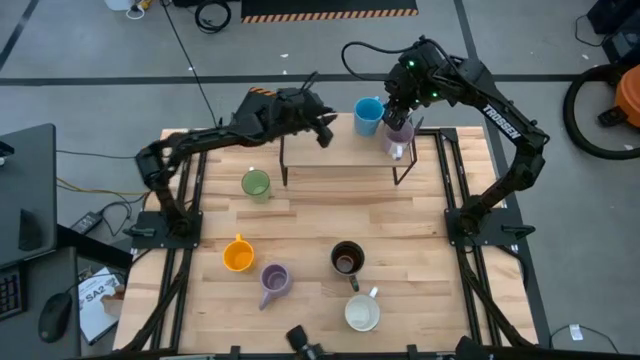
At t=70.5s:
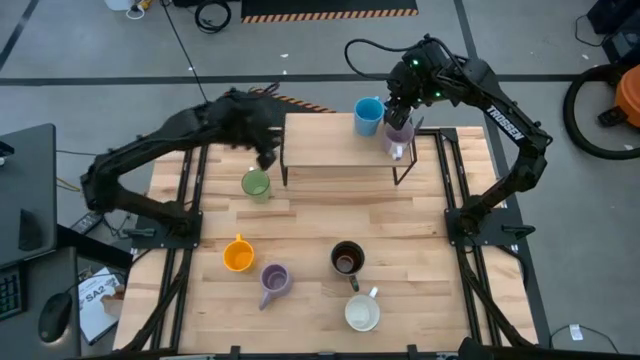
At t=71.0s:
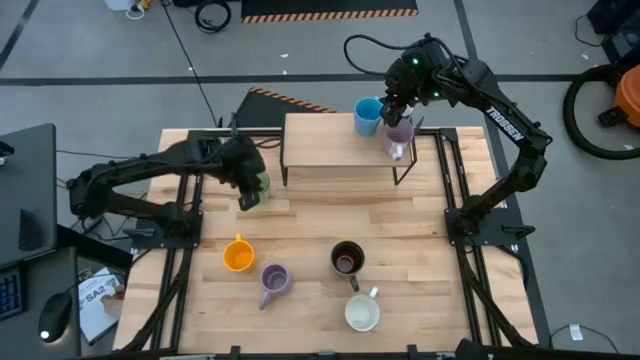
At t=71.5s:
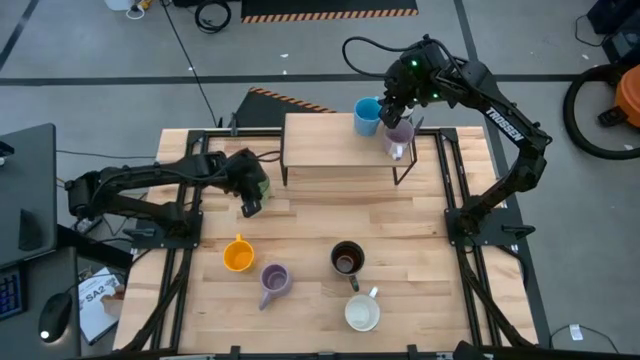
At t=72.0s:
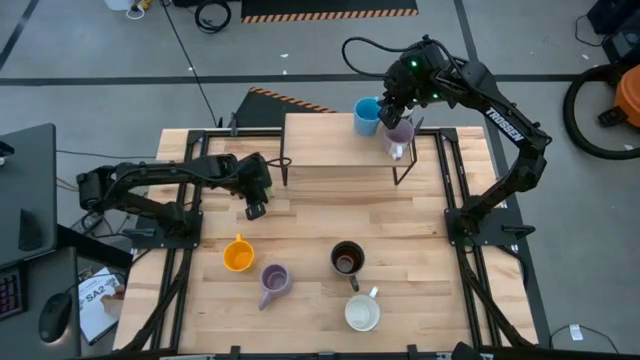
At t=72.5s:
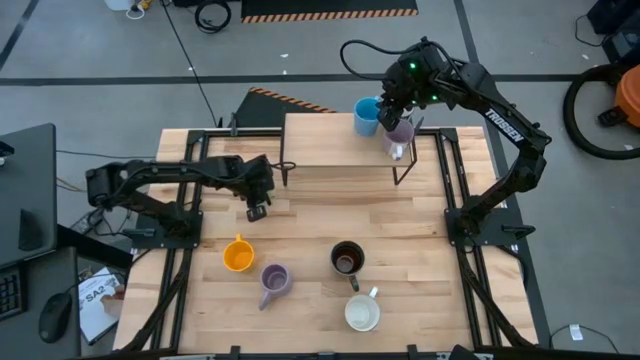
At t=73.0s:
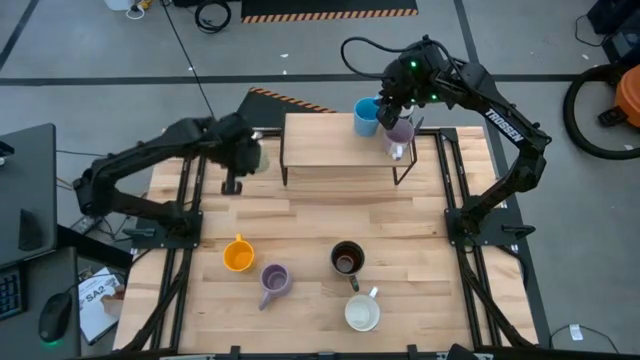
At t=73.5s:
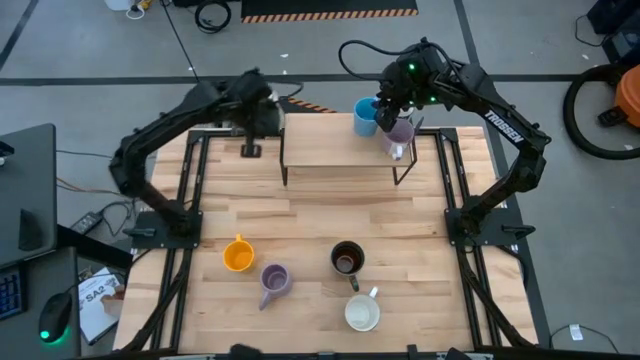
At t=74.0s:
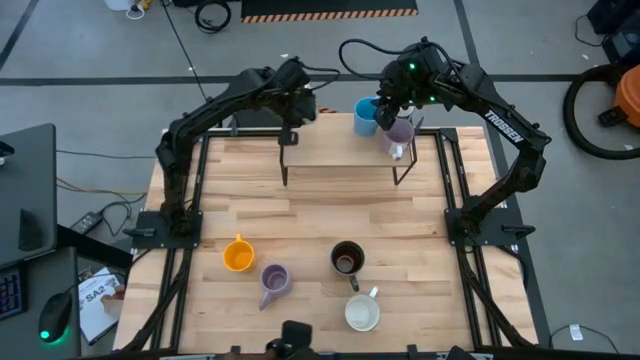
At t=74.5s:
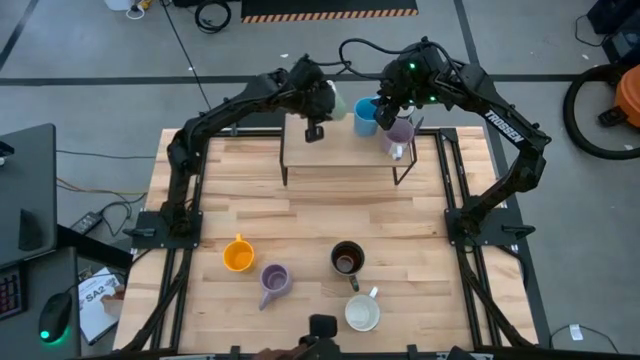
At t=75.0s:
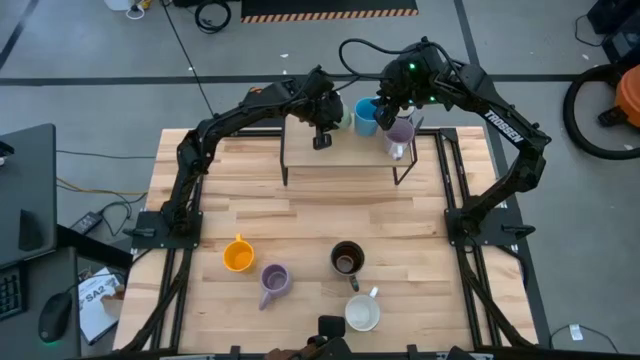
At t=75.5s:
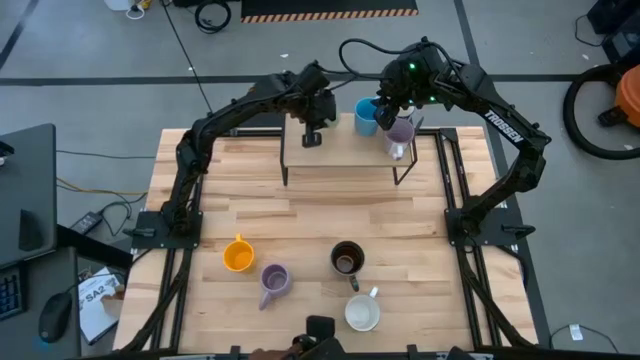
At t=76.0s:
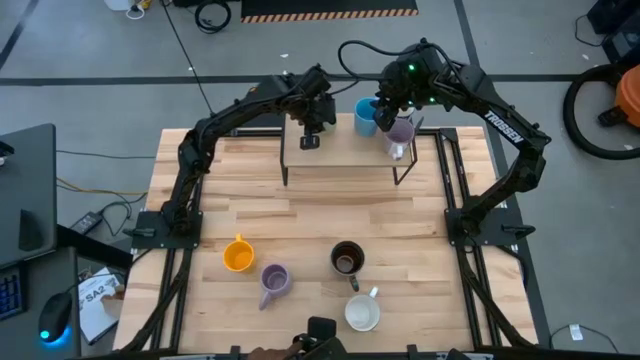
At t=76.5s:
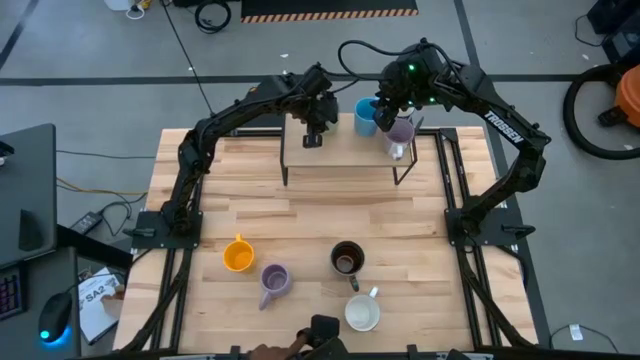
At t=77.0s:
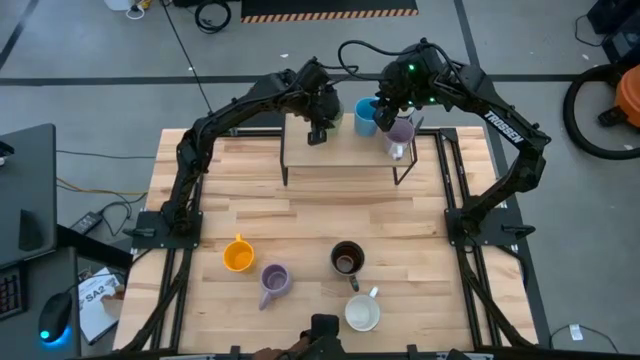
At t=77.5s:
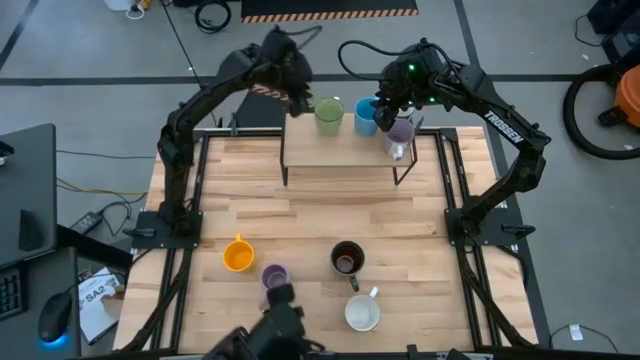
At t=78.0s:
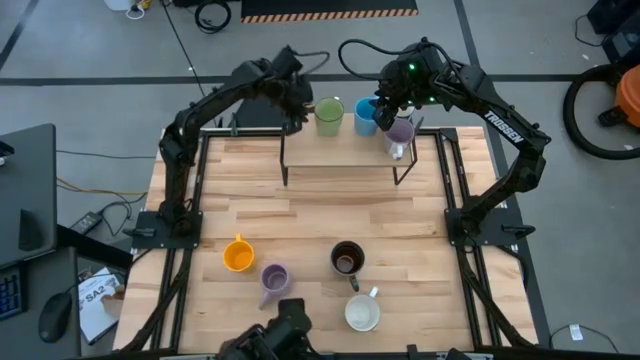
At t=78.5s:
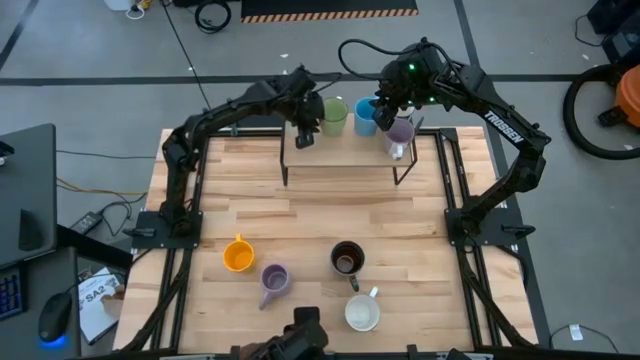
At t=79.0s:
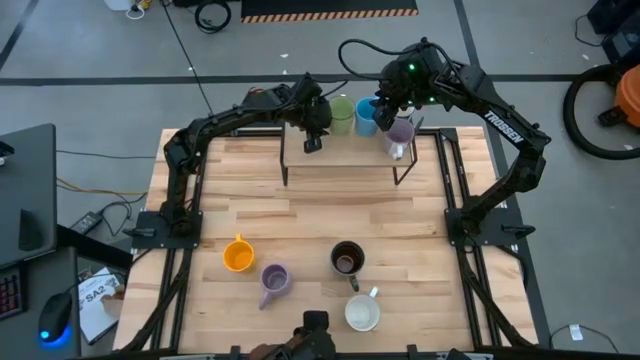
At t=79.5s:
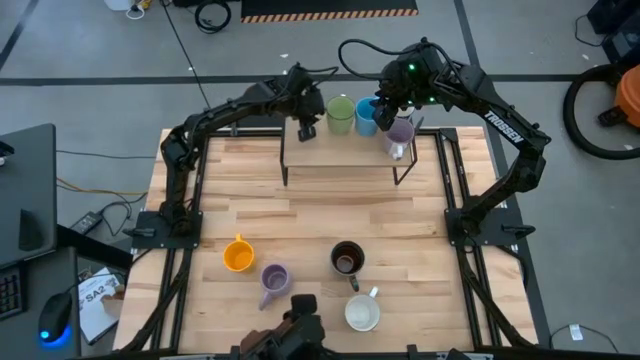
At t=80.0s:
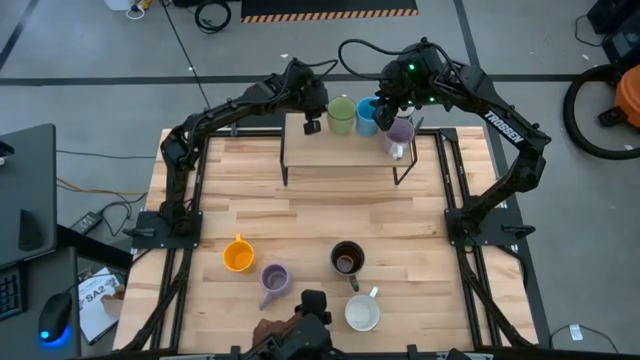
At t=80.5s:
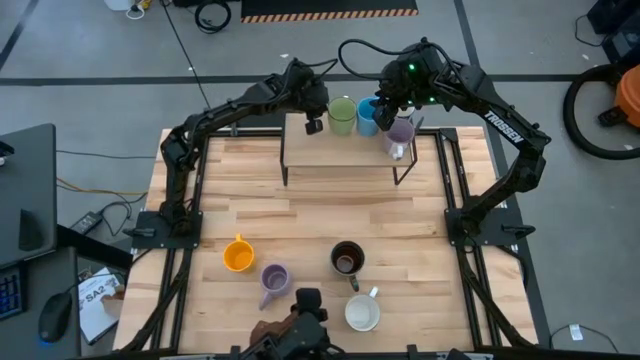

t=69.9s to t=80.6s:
Task: Place coffee mugs
Put the green mug on the shelf

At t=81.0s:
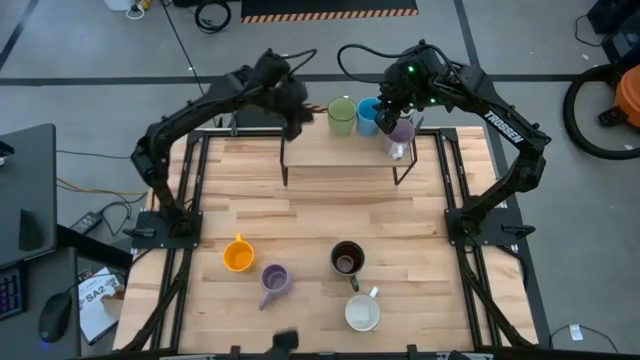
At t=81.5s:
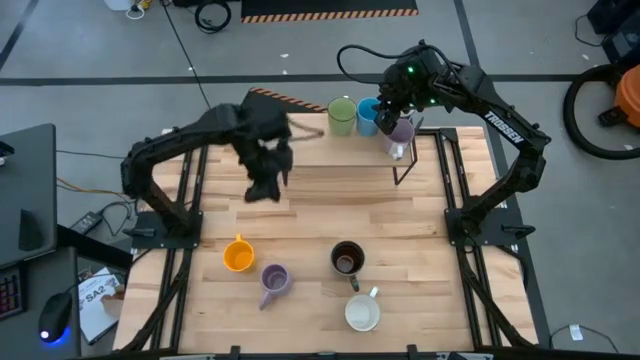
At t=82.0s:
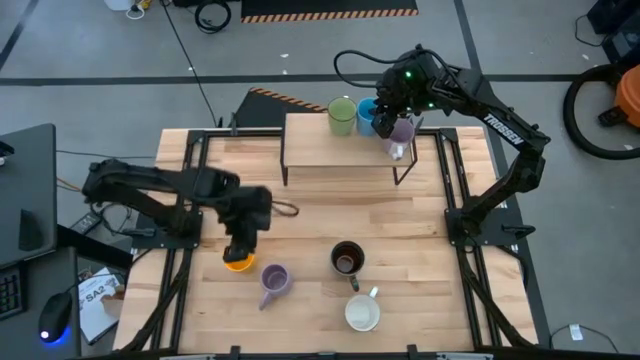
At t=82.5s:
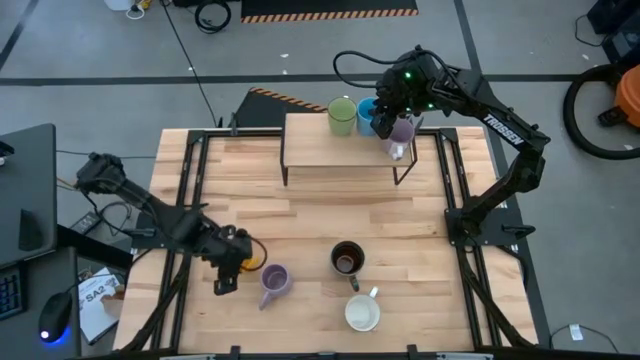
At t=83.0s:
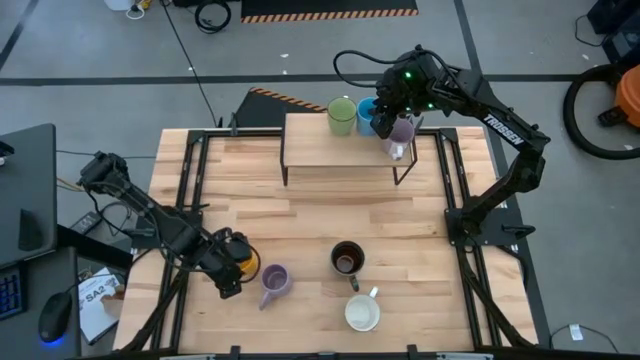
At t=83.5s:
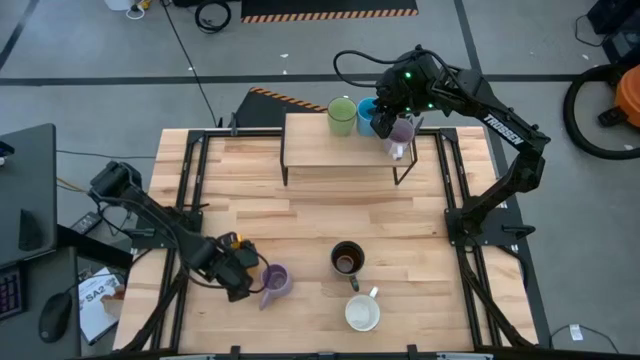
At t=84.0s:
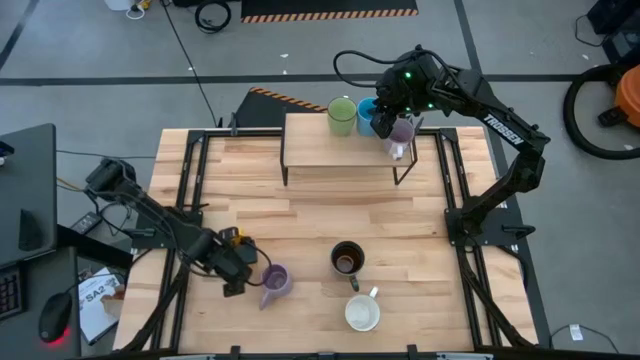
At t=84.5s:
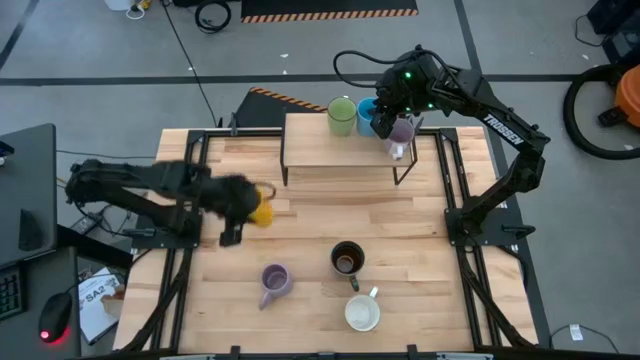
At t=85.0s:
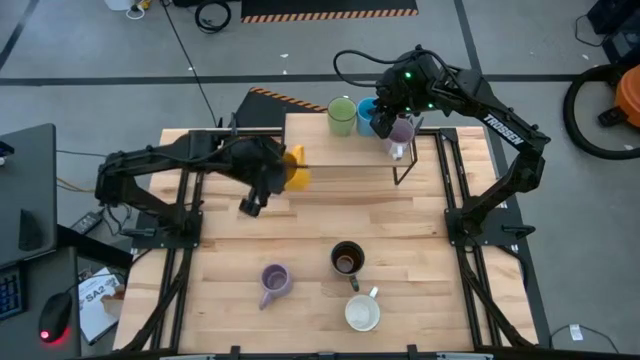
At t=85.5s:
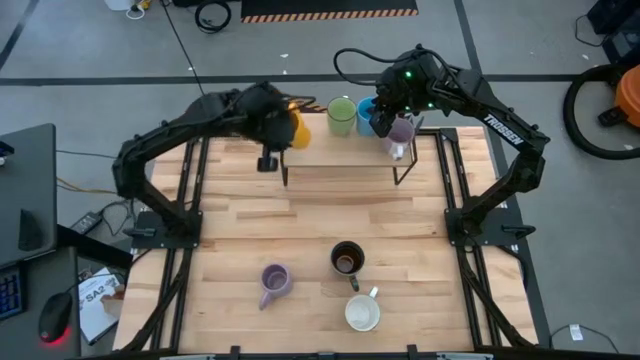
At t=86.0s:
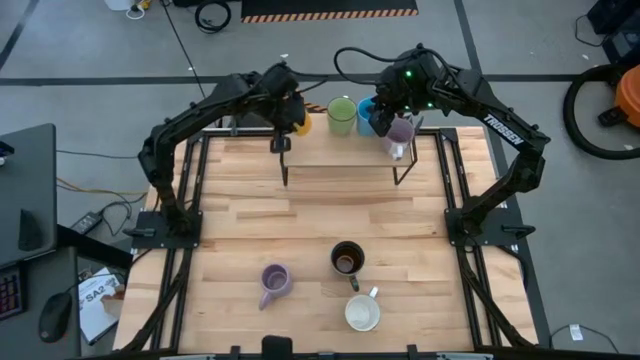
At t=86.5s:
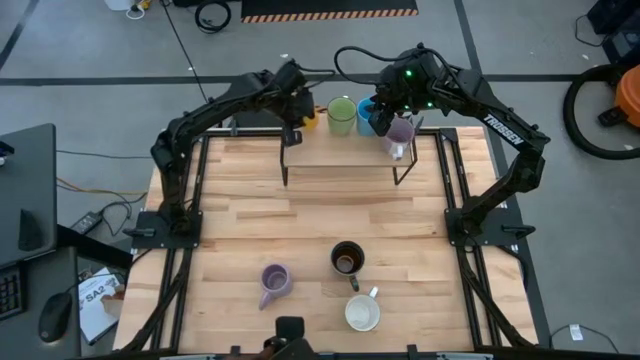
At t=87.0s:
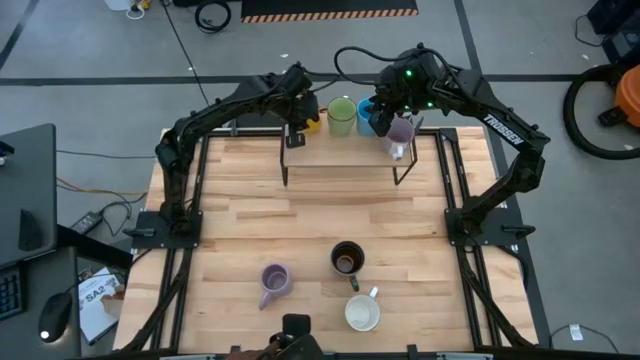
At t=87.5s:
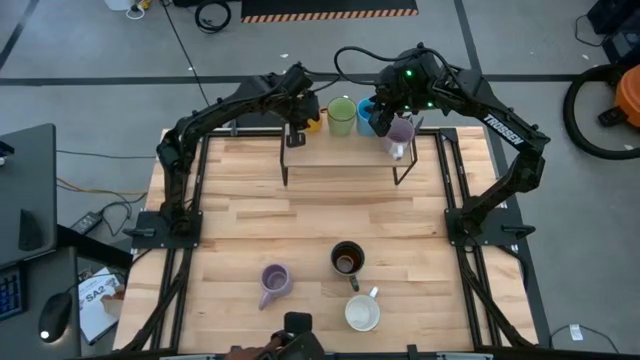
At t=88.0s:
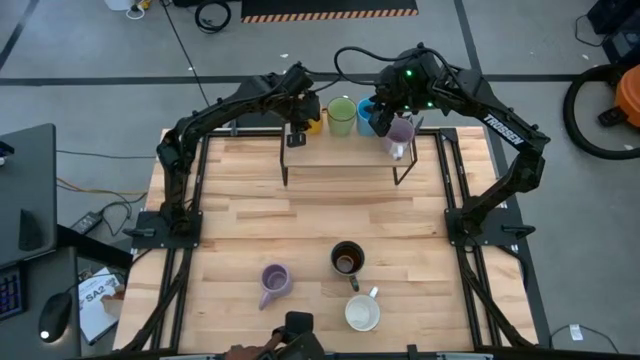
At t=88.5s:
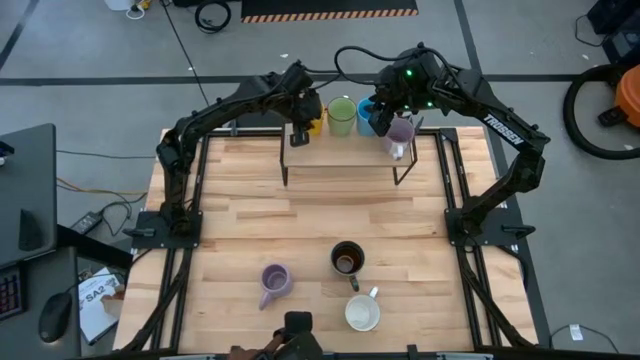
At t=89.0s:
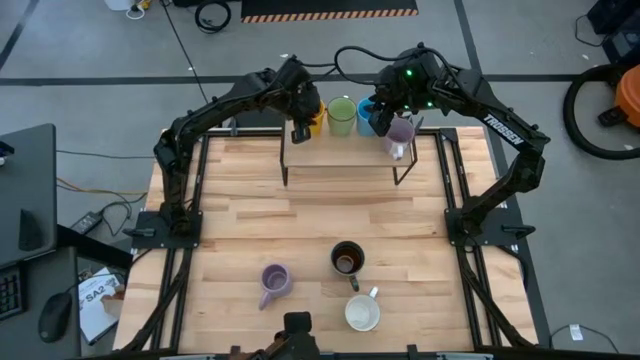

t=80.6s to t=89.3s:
Put the yellow mug on the shelf
